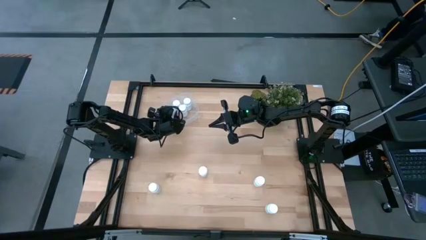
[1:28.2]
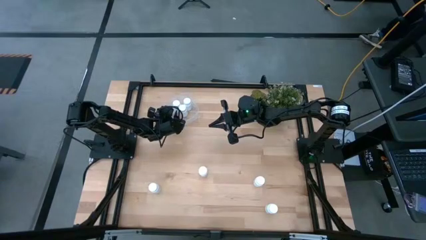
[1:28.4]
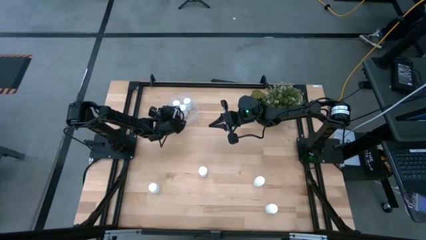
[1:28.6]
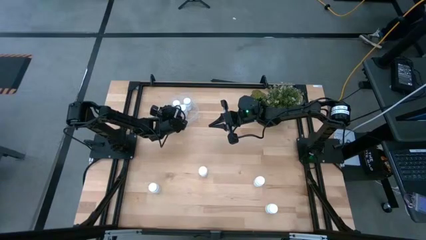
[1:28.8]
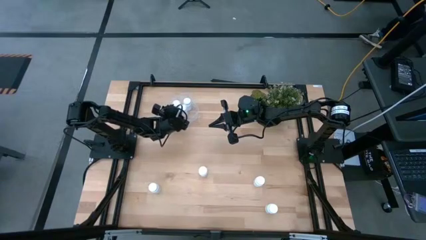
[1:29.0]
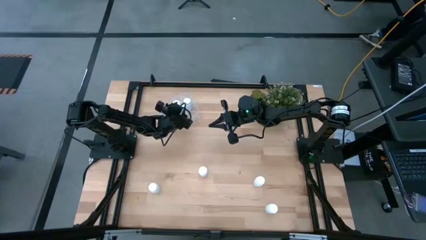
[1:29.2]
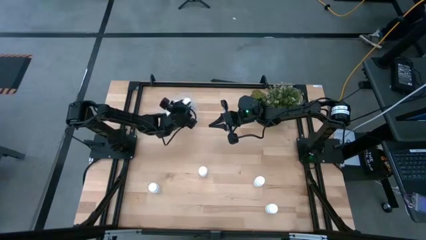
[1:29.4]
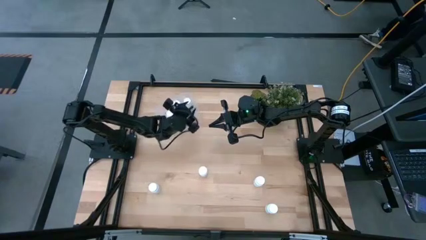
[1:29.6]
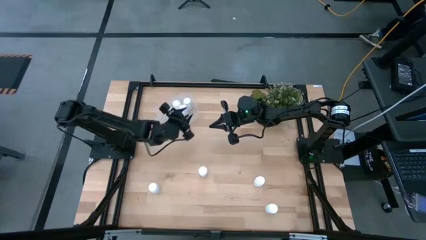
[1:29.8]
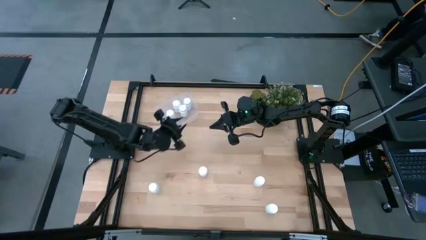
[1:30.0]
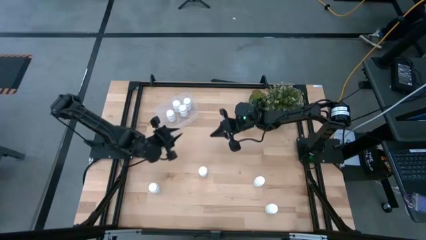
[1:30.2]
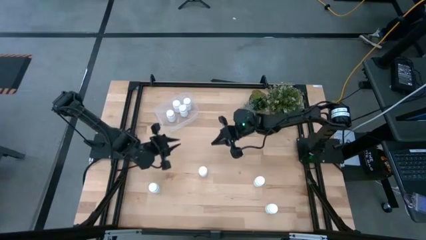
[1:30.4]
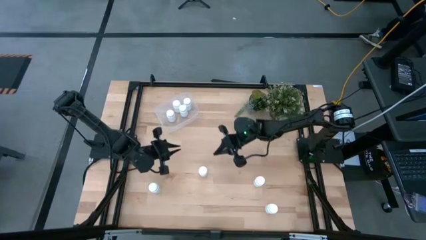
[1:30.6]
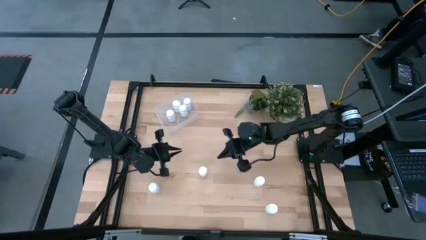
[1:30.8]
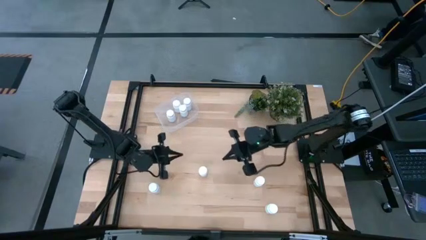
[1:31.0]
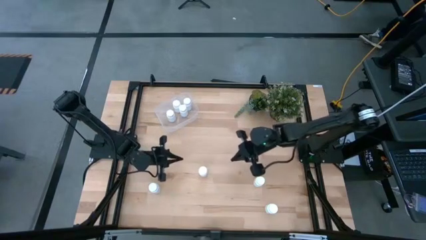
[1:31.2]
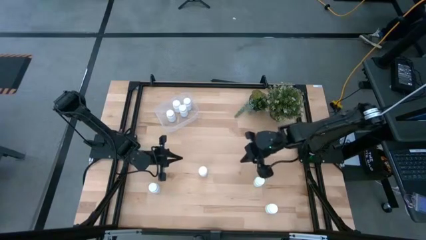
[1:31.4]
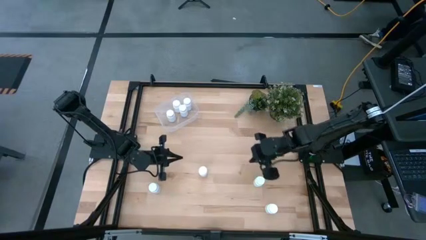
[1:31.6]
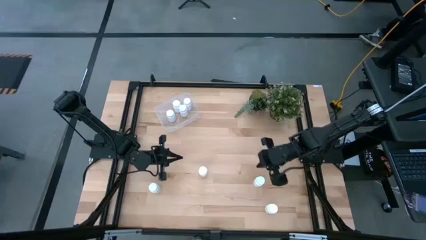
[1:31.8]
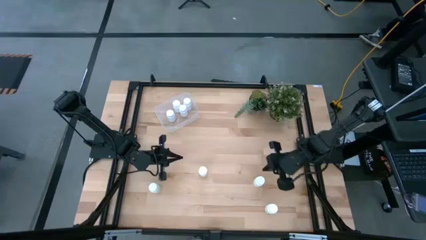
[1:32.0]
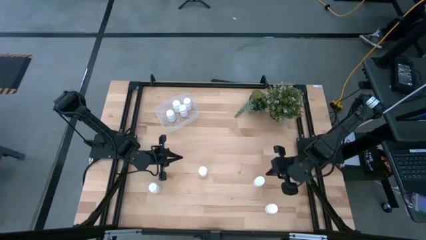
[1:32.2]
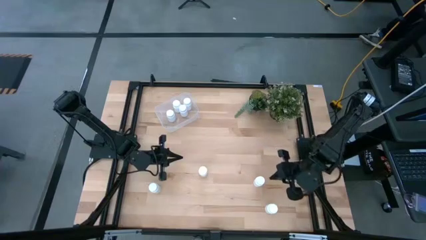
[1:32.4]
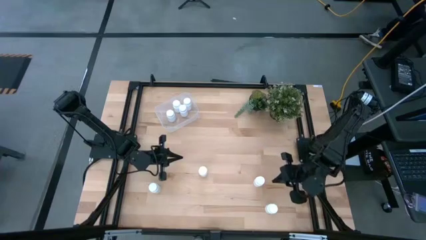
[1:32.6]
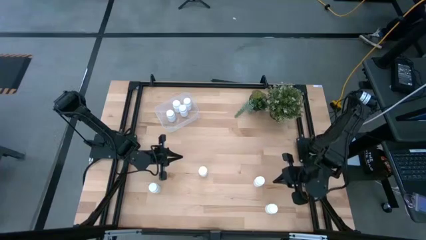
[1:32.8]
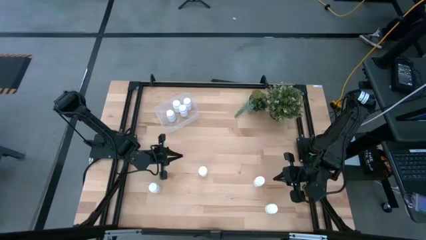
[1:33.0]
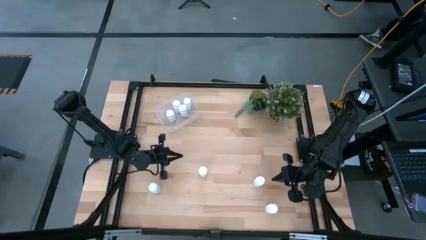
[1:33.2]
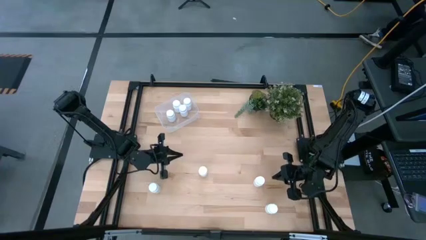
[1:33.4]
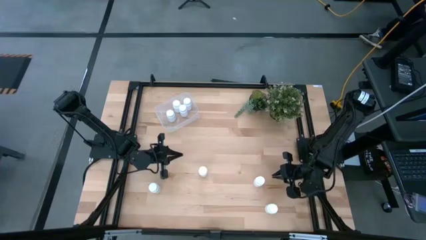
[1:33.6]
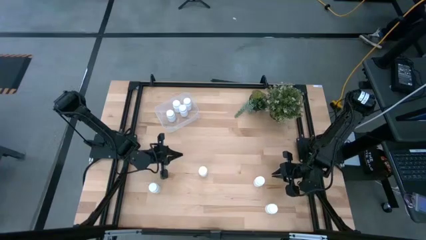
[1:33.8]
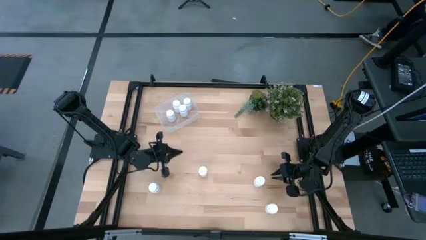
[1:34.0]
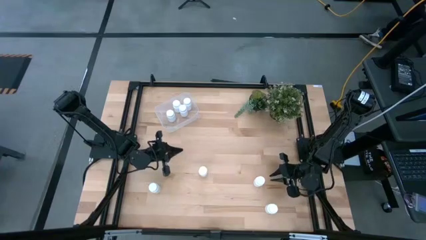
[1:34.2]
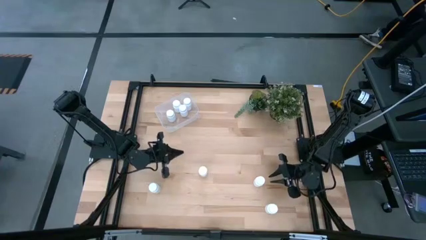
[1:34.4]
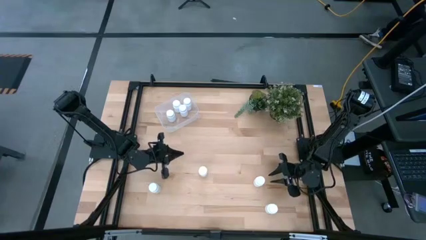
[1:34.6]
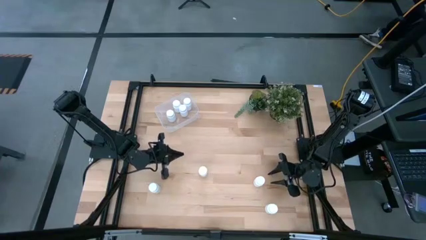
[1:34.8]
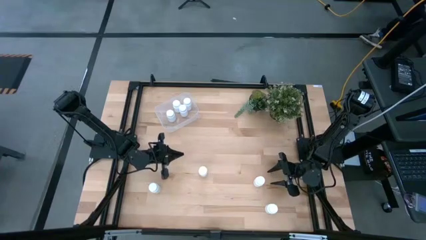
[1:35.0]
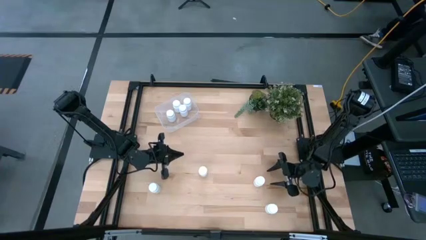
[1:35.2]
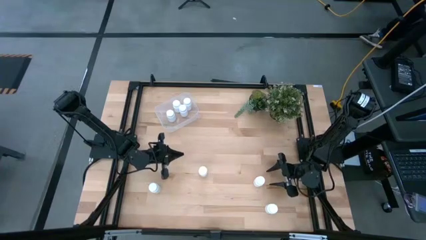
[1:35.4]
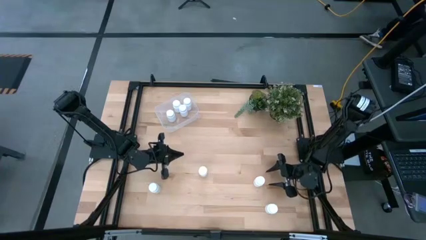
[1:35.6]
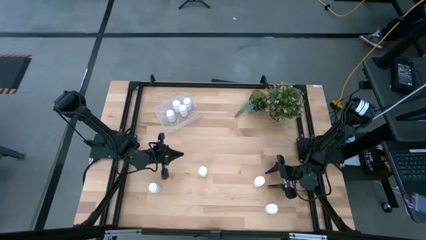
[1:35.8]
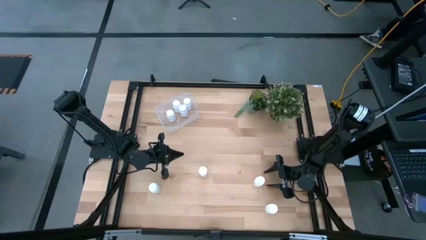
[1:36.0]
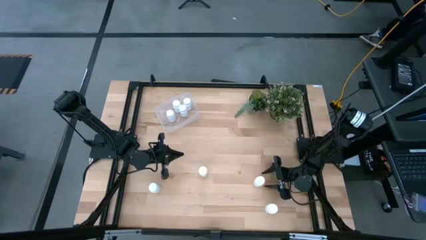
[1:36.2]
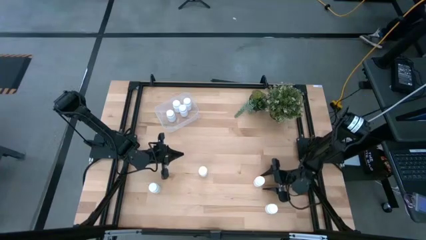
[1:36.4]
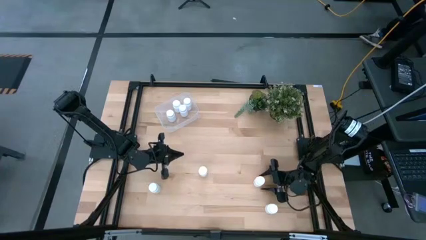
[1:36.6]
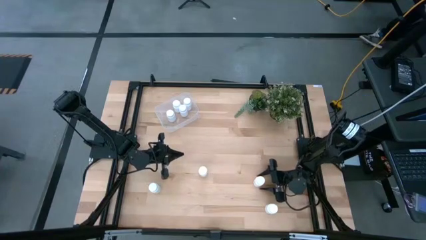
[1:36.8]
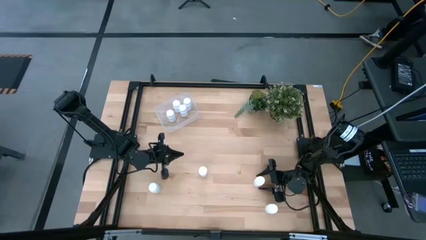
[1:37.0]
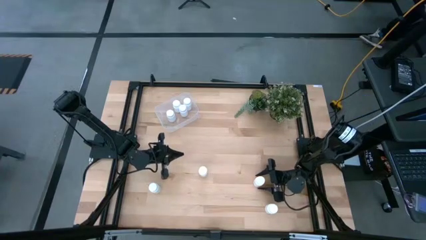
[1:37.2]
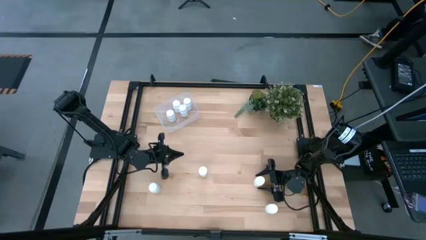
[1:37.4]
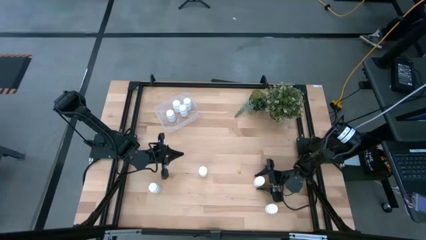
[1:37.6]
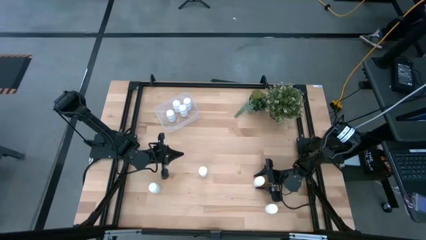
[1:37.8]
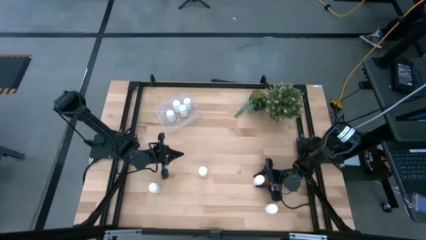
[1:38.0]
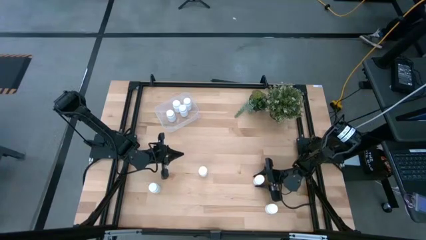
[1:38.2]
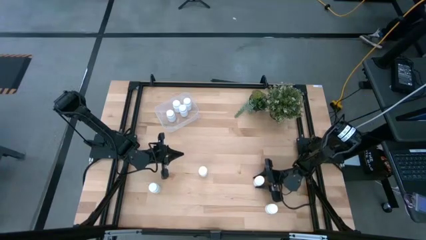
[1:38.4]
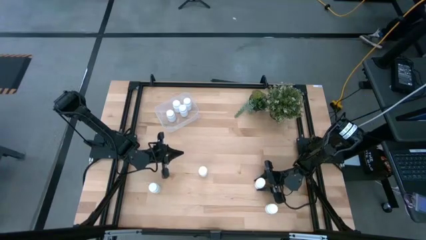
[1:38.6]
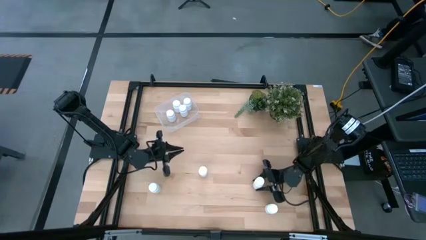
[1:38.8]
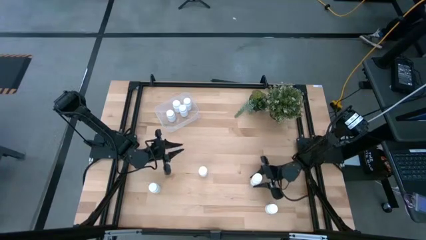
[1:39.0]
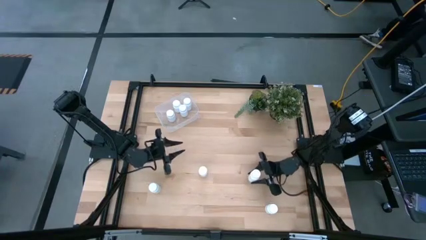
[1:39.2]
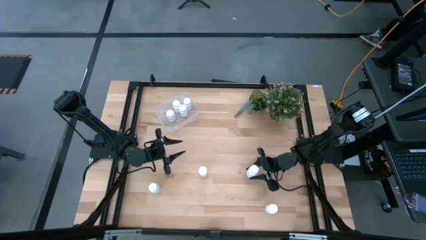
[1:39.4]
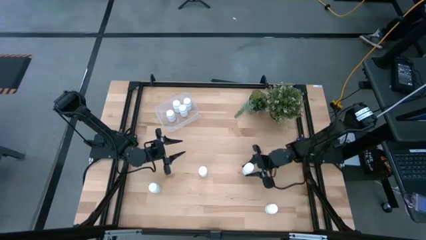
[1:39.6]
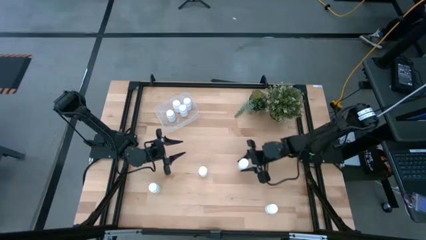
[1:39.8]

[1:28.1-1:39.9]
Task: Pick and place pill bottles into a basket
Put the white medicine bottle into the transparent bin
